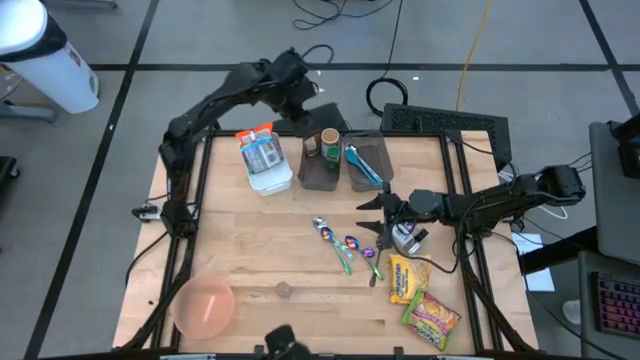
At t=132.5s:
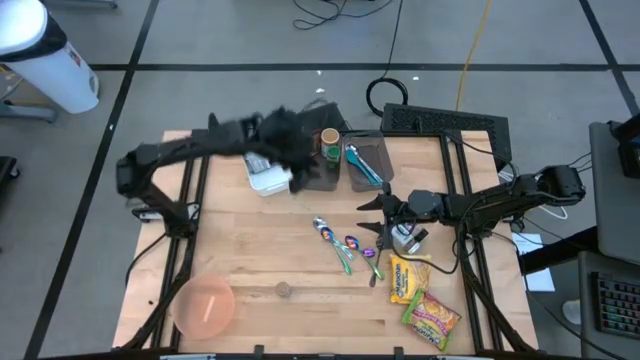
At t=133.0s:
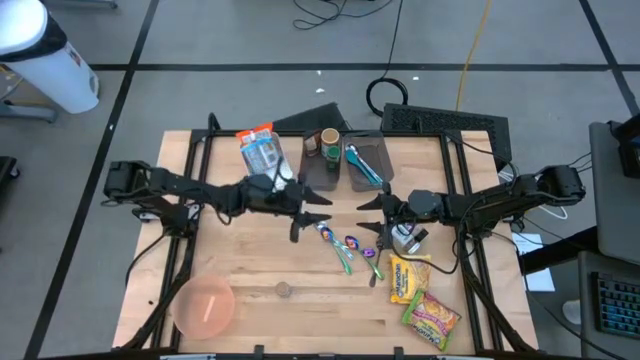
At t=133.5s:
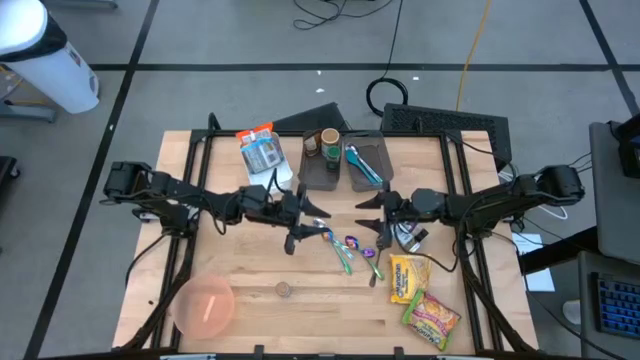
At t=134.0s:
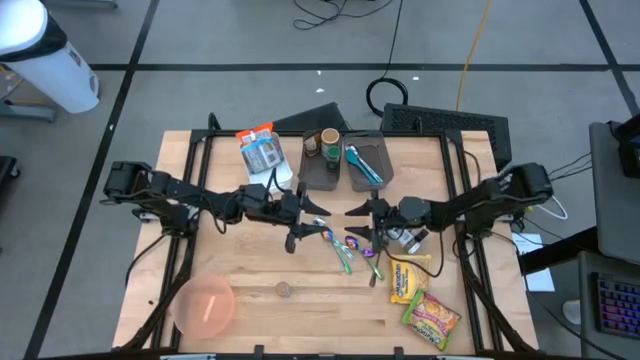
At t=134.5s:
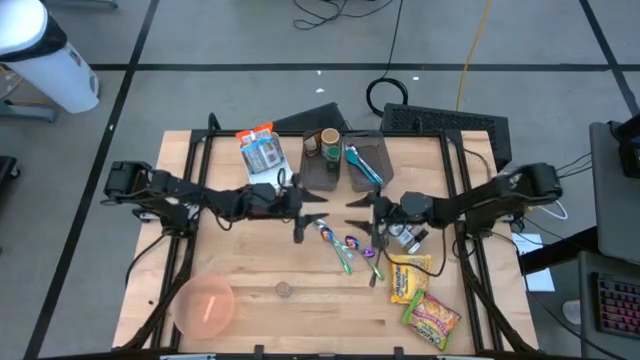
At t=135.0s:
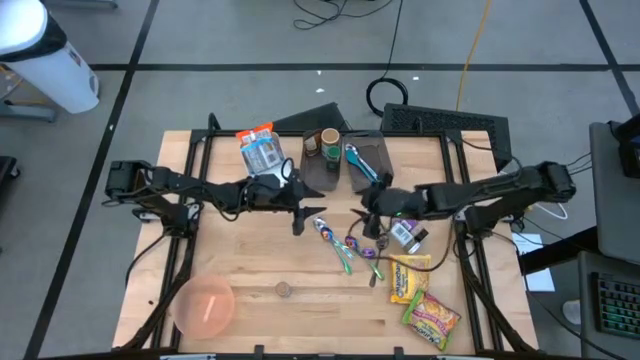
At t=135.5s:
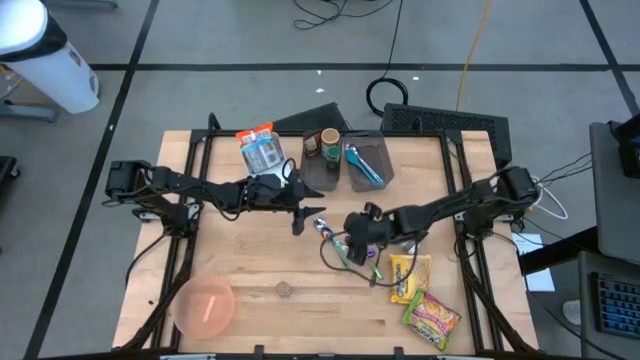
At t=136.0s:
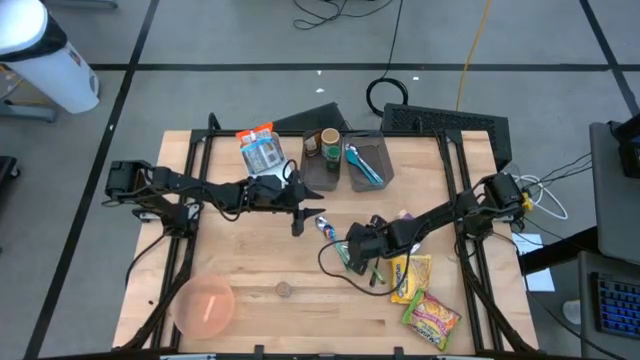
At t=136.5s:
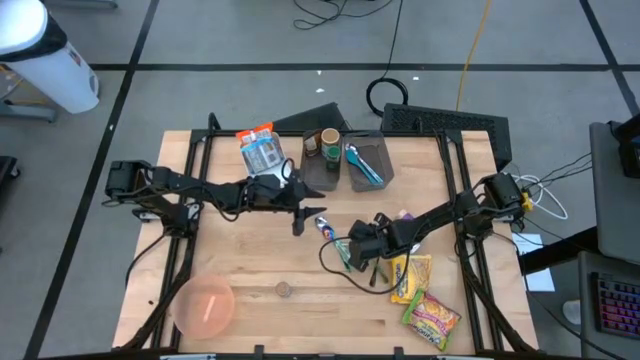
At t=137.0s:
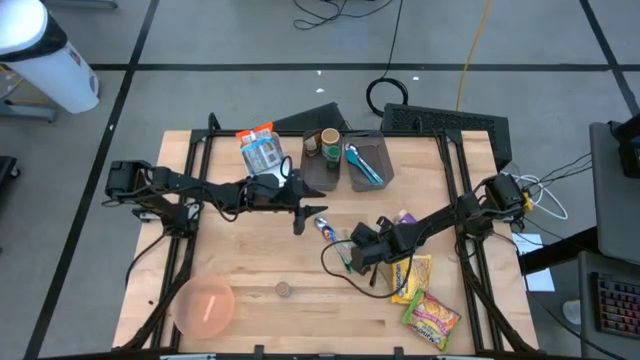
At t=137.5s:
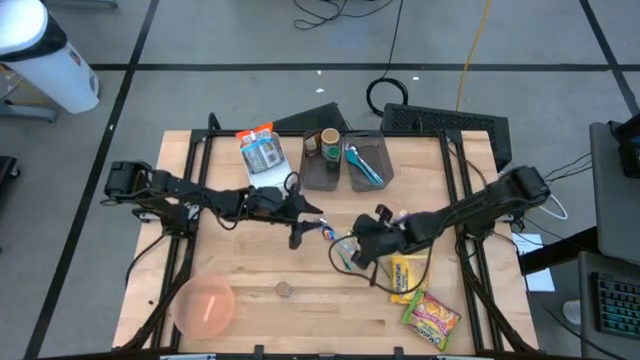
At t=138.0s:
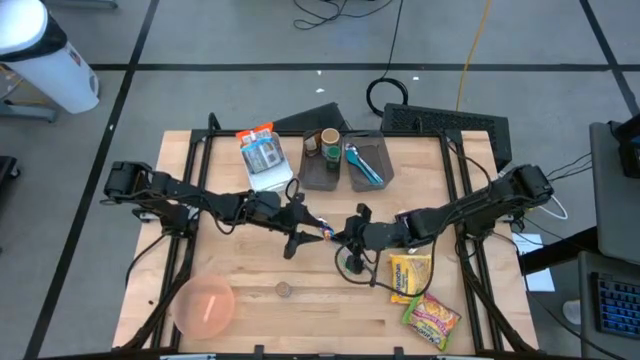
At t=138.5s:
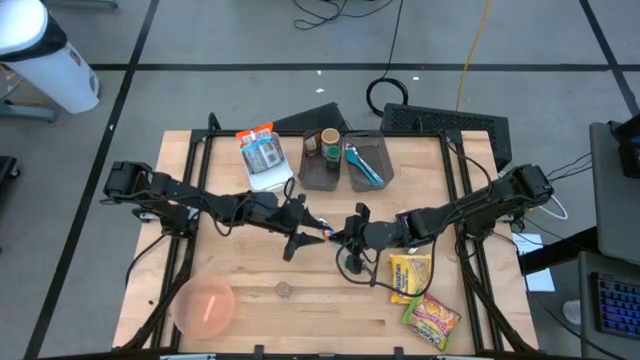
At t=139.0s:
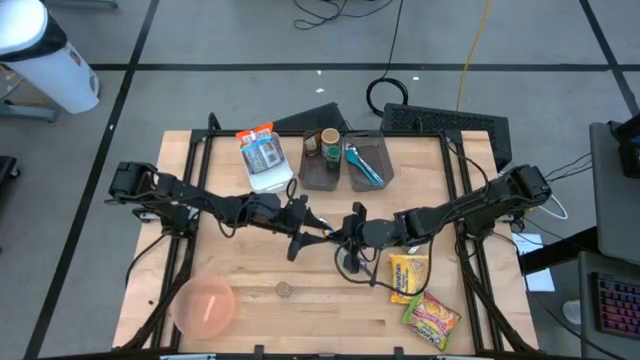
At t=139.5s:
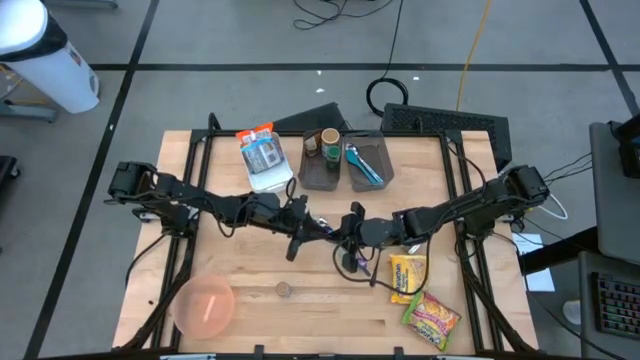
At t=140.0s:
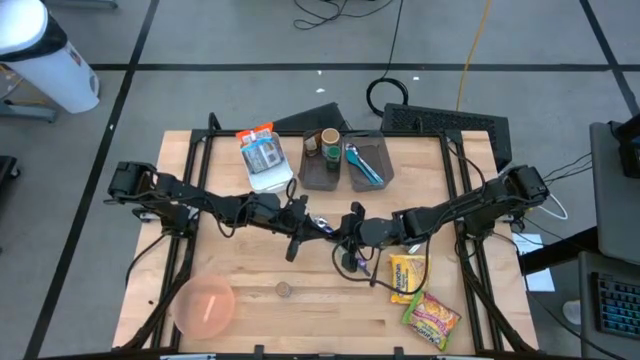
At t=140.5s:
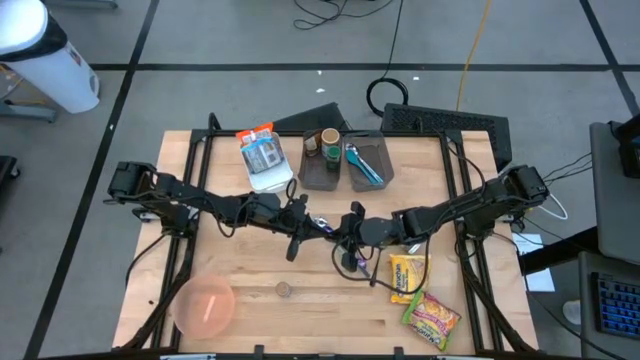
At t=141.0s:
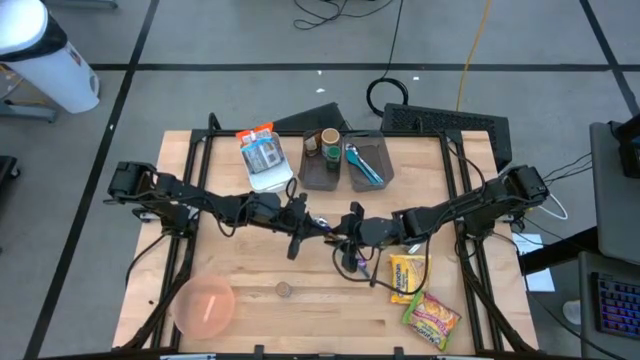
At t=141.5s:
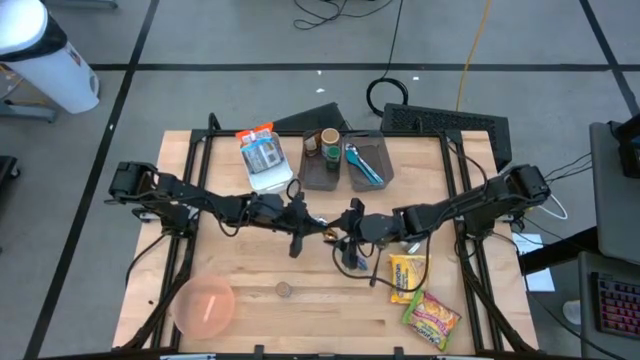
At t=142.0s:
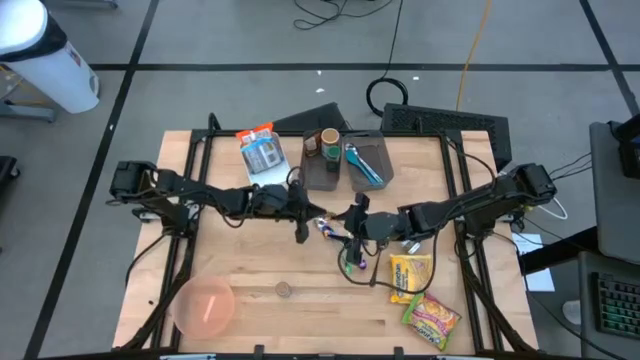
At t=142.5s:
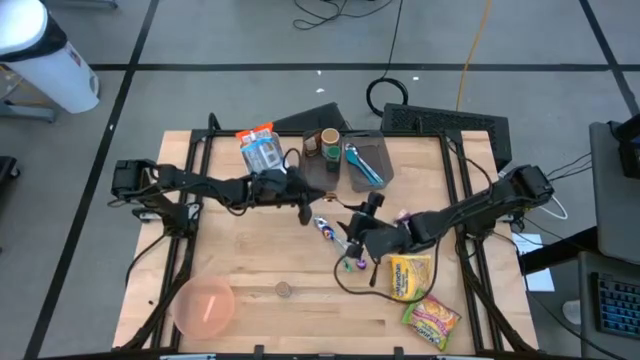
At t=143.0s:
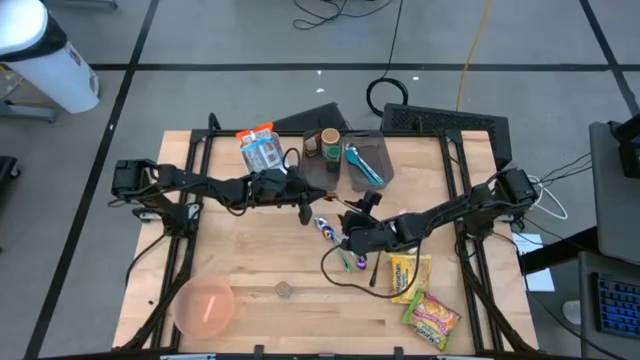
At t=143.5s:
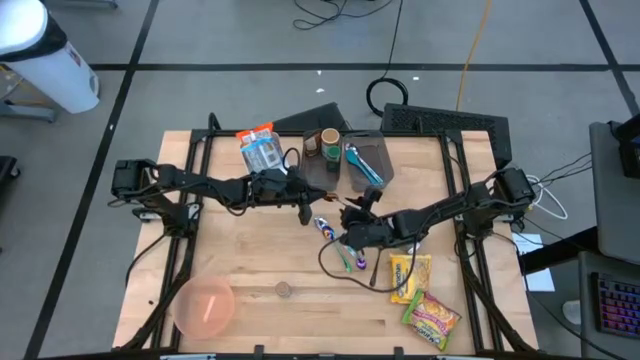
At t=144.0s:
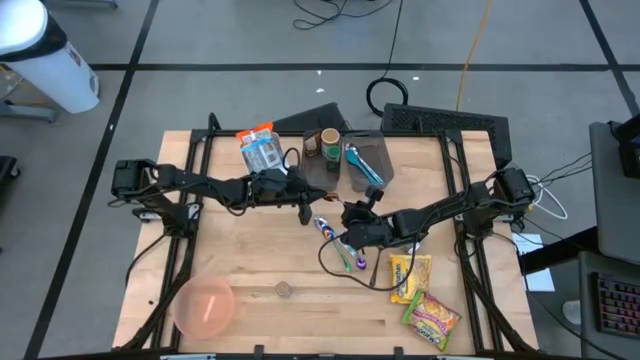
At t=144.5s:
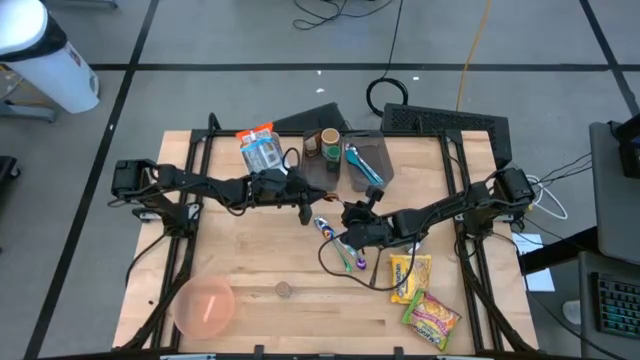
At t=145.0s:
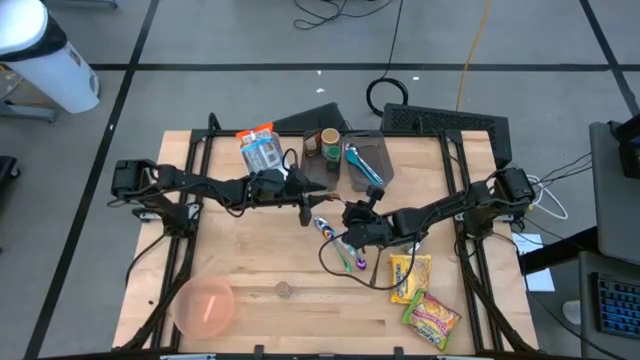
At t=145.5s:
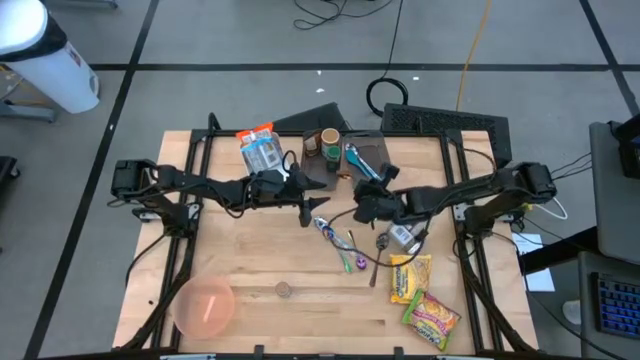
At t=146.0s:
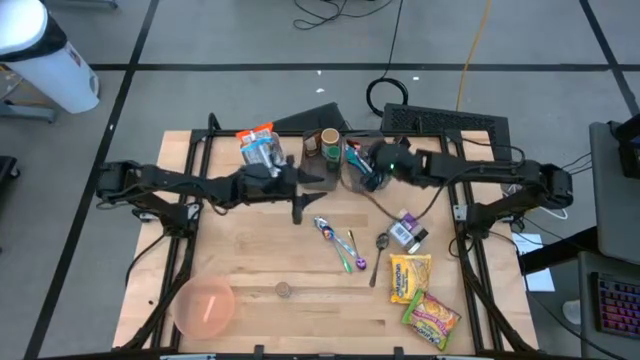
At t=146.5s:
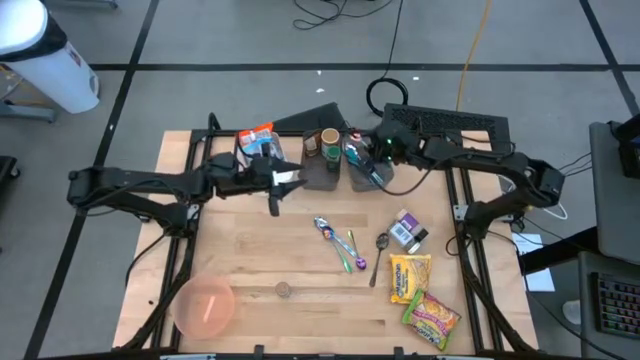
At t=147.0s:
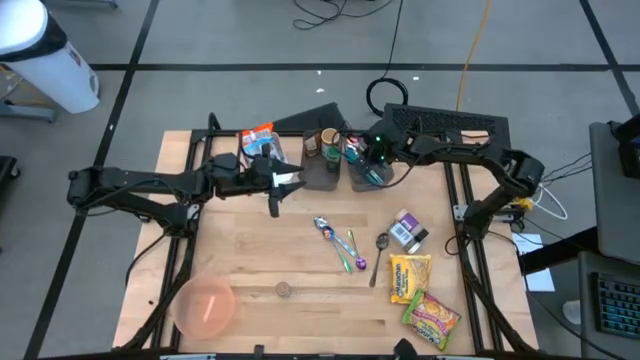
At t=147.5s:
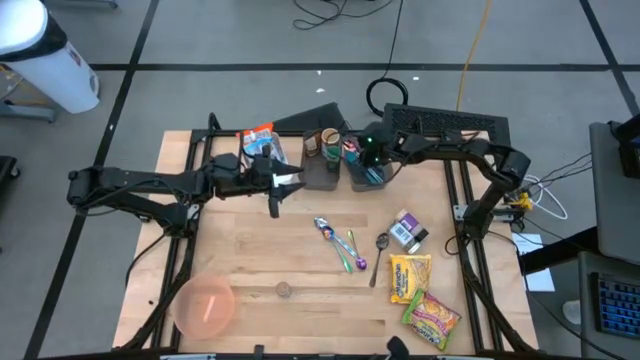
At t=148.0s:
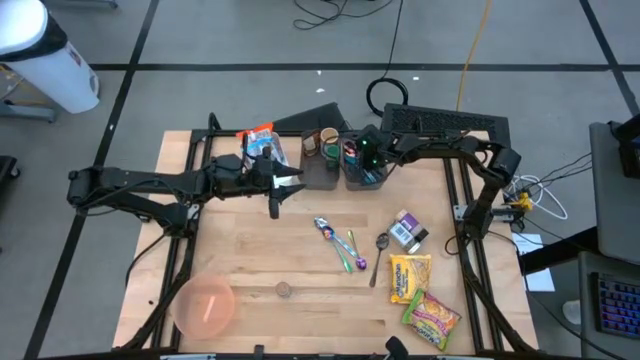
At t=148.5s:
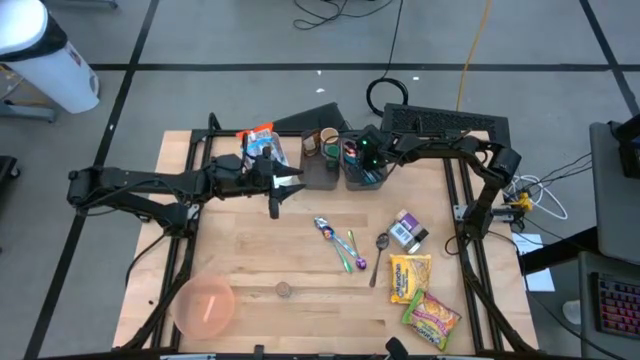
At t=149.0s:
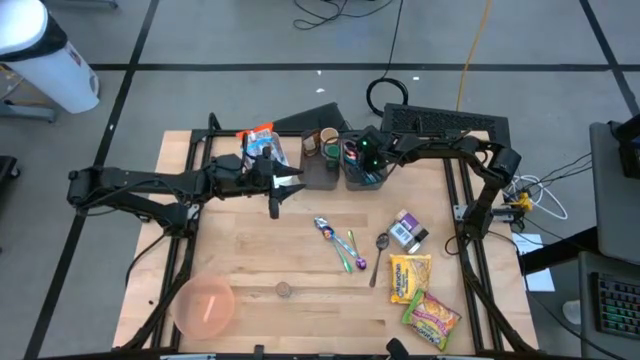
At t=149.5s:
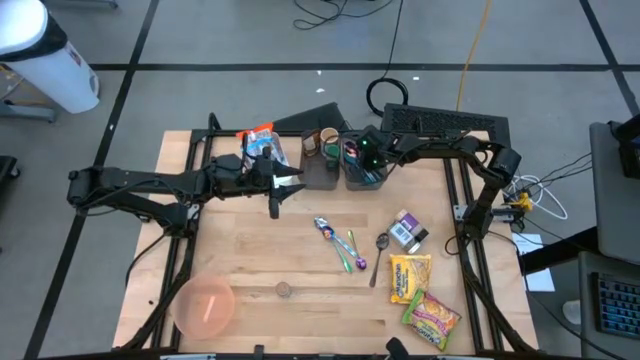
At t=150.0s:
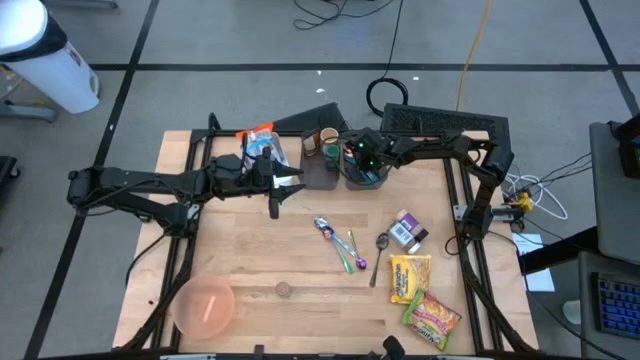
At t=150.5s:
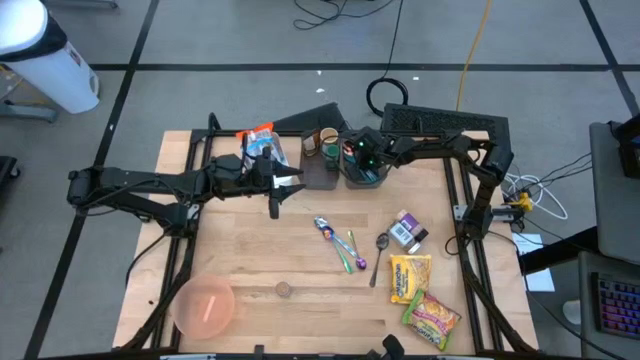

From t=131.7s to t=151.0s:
Task: Pick & Place Food Item
Put the middle purple spoon into the right black bin

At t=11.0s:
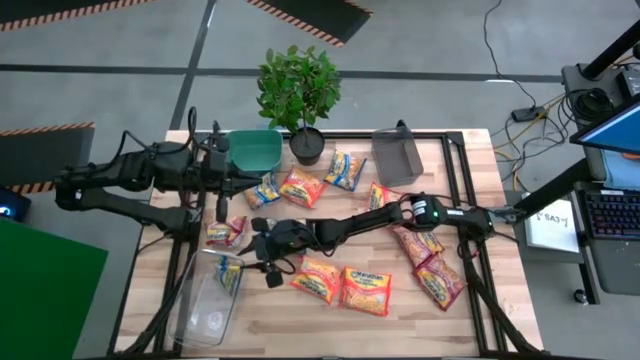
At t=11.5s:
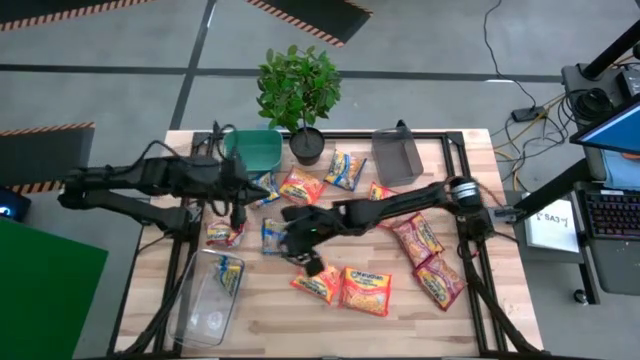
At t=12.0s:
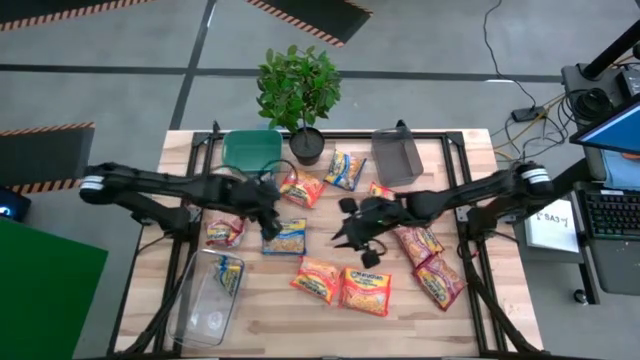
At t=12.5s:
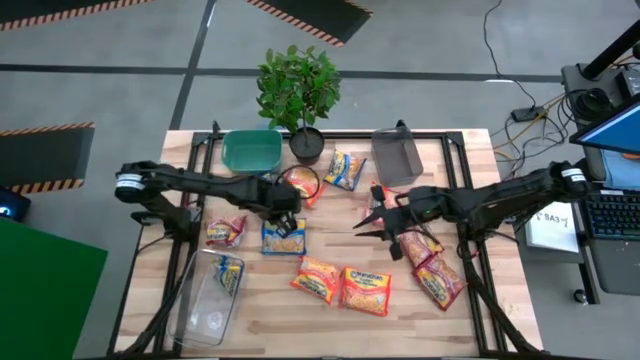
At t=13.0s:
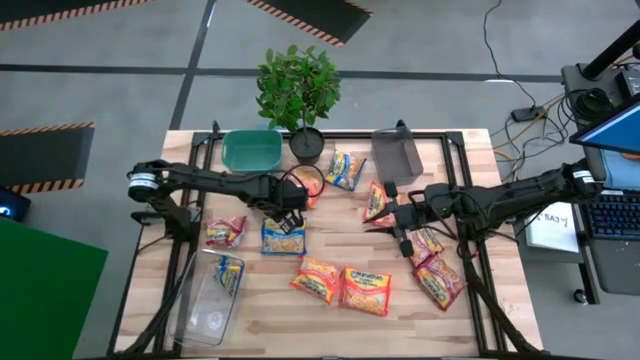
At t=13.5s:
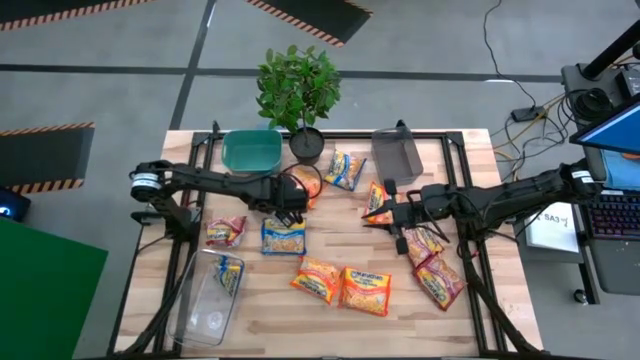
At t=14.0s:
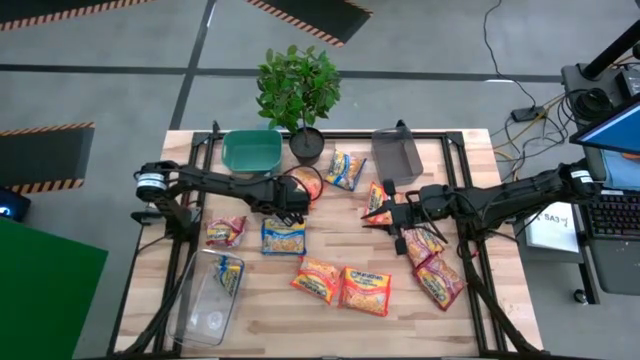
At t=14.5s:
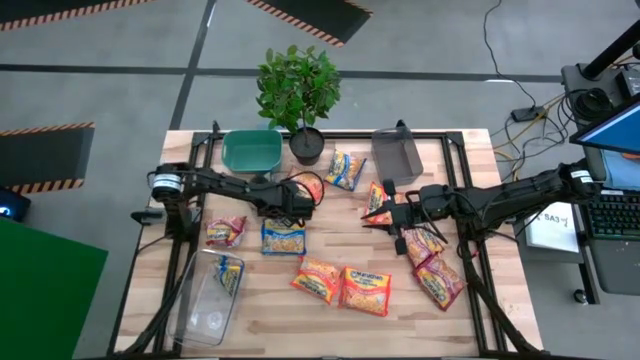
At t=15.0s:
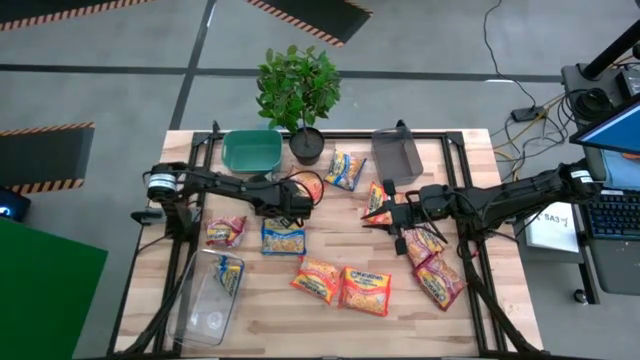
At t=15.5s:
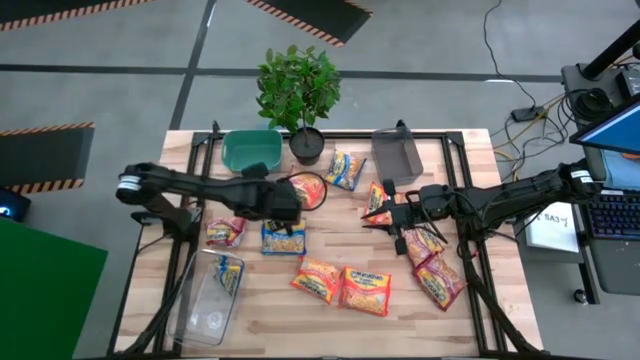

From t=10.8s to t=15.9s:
Task: Sort Maruchan noodles
Put the blue noodle pack into the transparent bin
